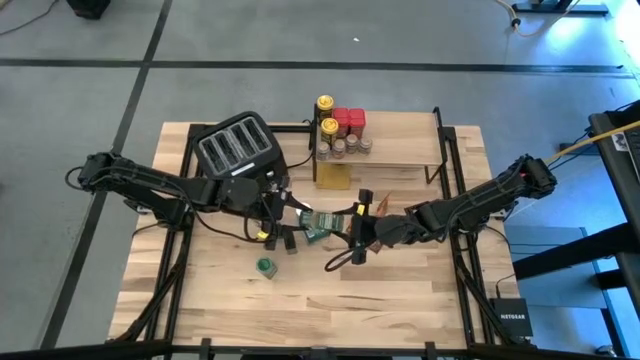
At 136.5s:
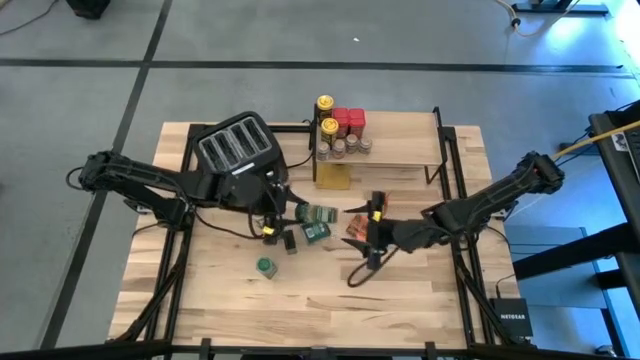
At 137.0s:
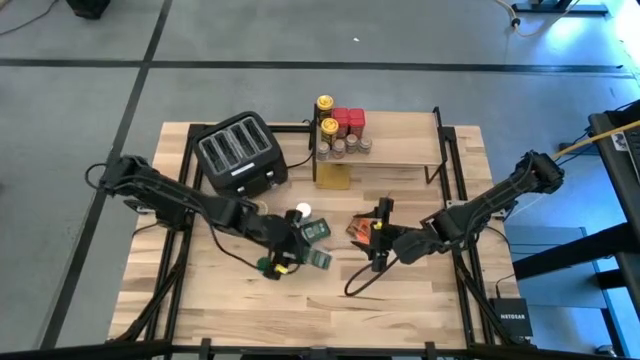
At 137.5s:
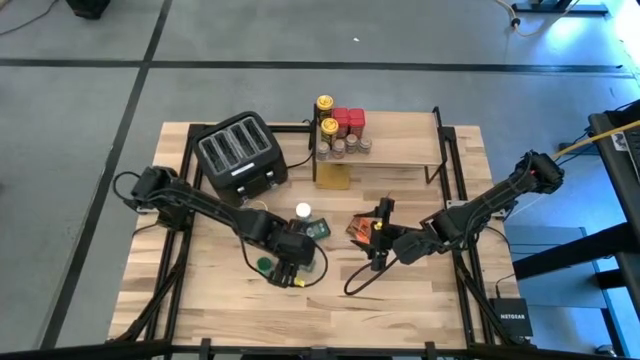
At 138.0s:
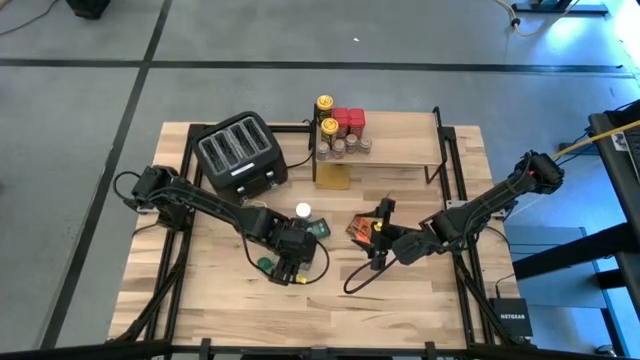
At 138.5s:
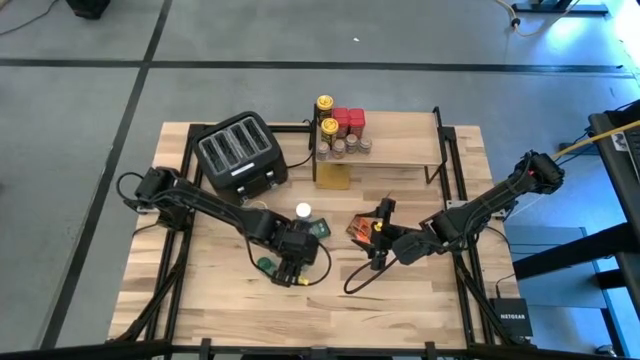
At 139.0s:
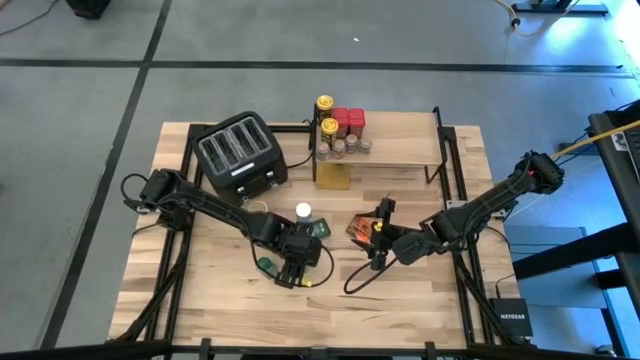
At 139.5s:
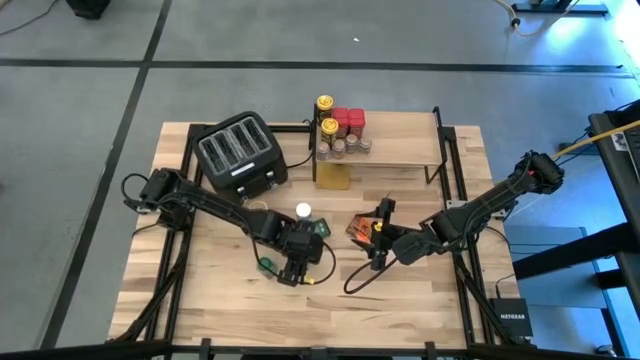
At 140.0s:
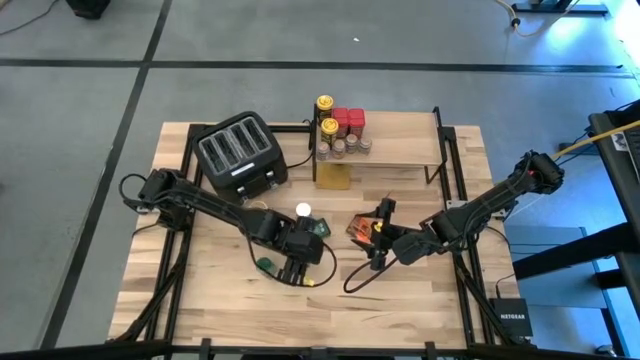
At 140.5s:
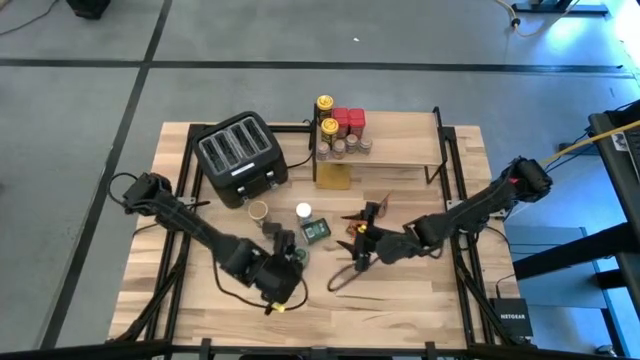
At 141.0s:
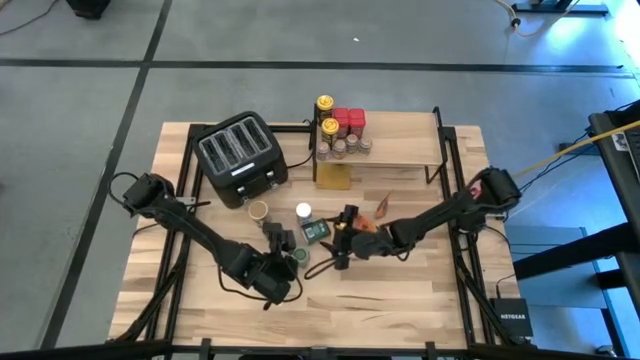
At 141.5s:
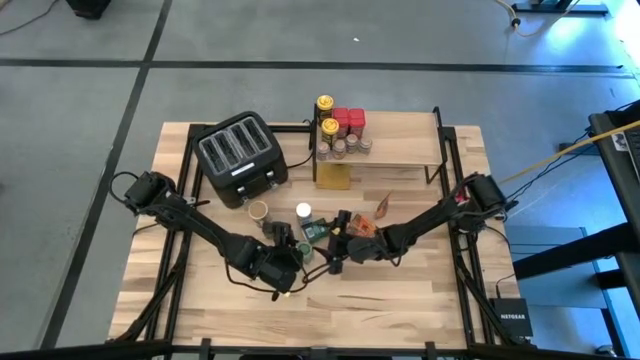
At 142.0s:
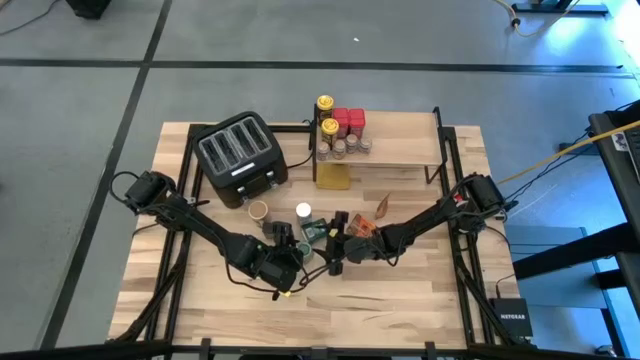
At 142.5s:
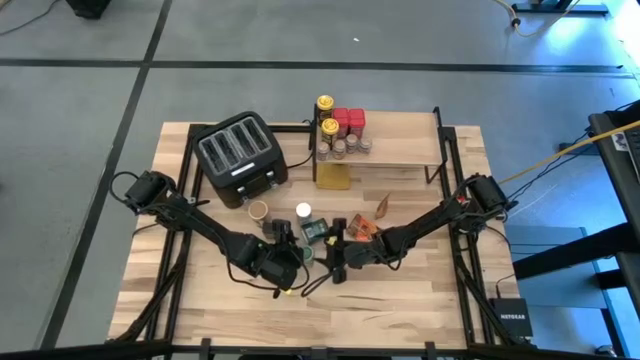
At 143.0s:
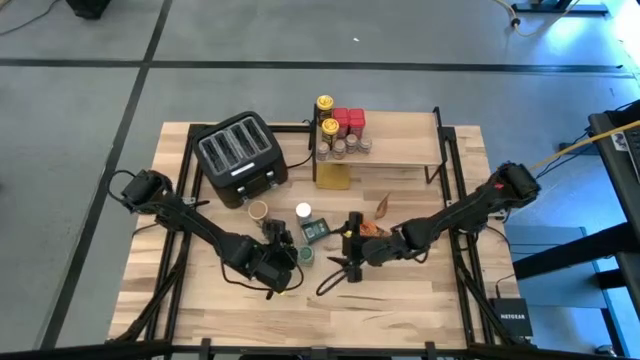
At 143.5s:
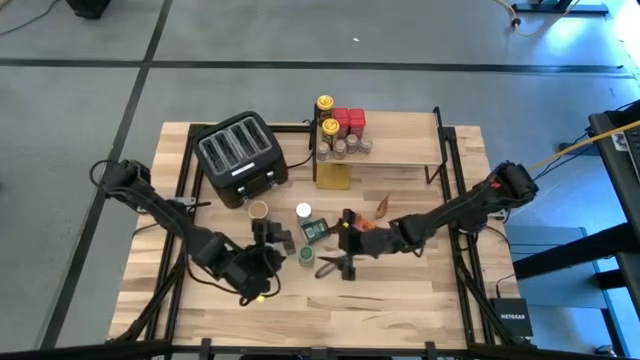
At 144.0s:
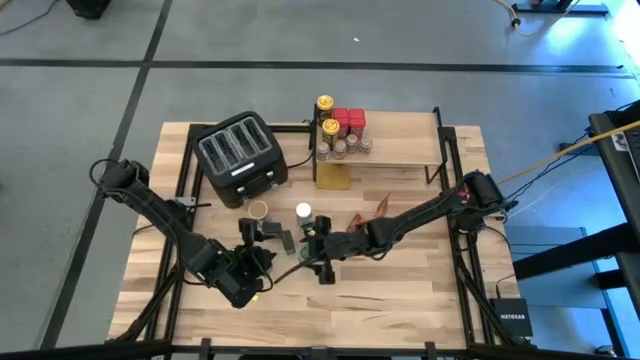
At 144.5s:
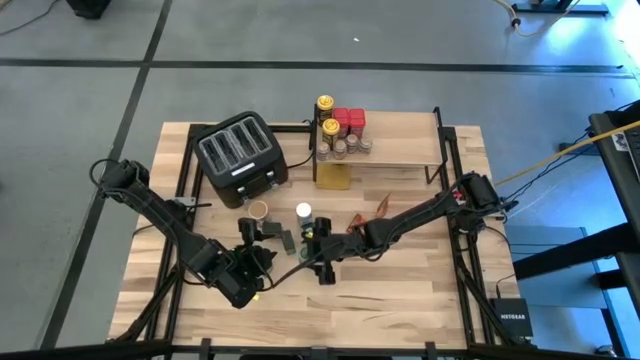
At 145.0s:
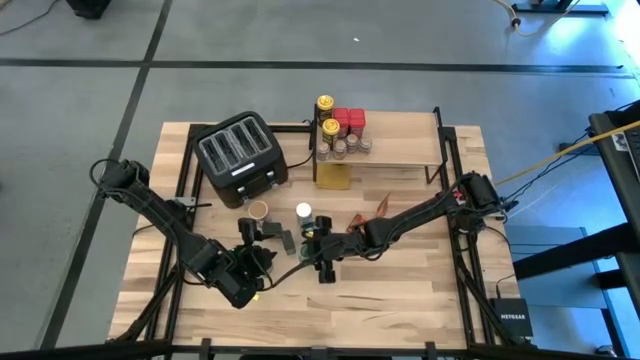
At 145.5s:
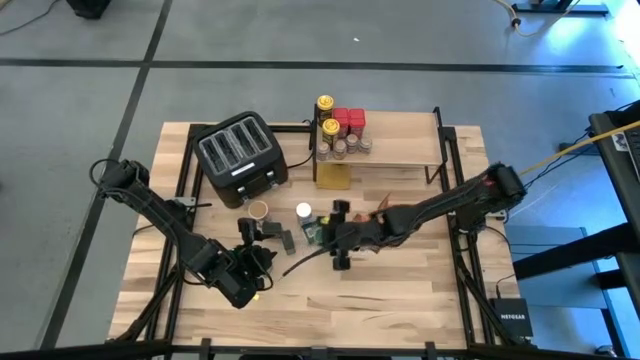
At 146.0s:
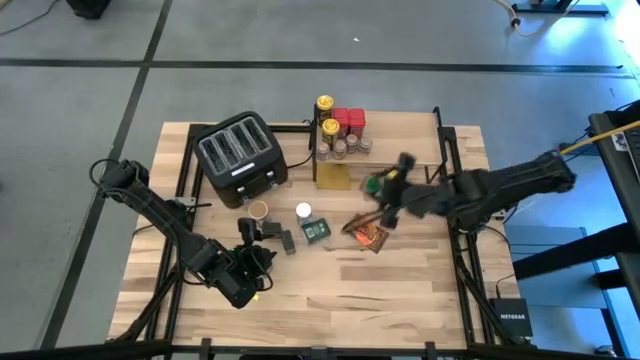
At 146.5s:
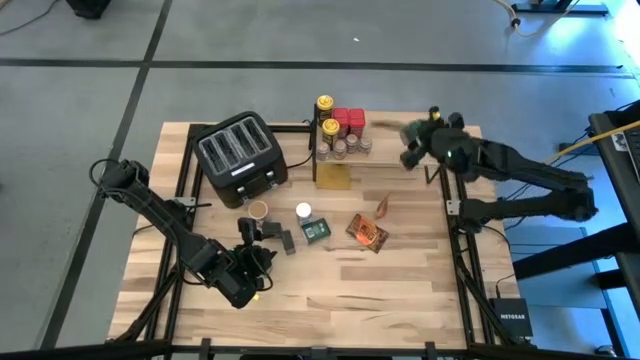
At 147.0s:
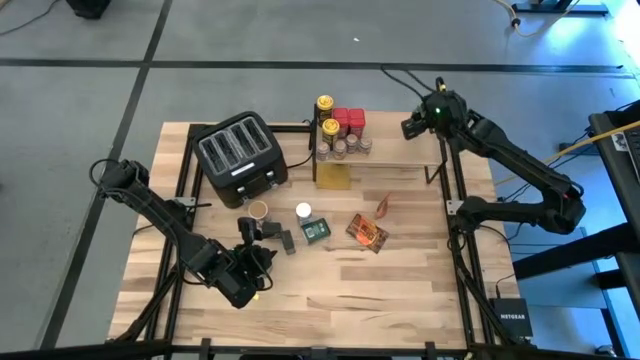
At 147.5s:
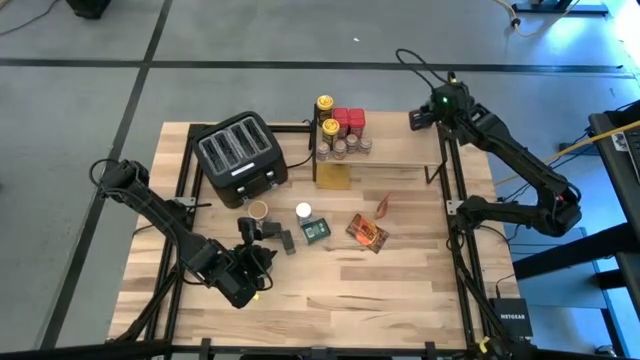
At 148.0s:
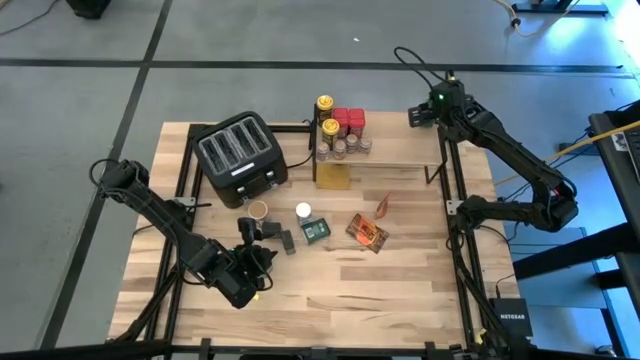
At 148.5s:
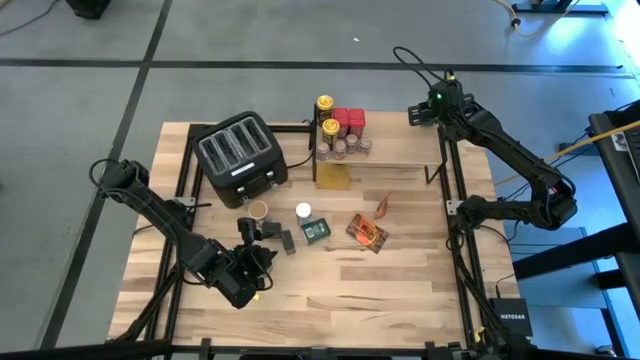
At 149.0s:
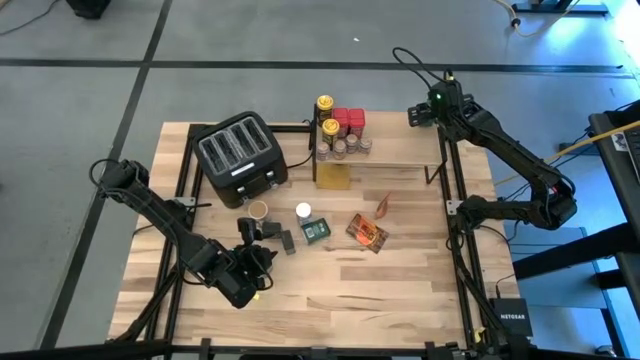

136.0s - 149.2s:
Task: Shelf spices
Put the green seasoning bottle on the shelf

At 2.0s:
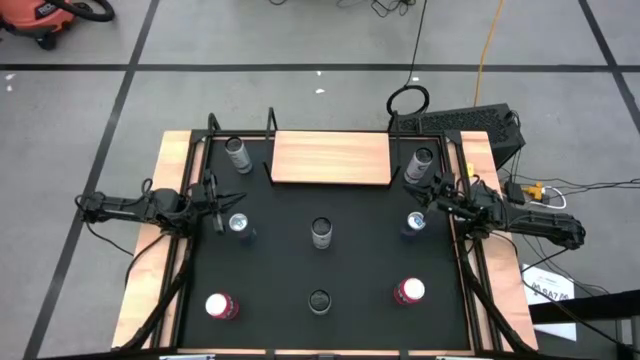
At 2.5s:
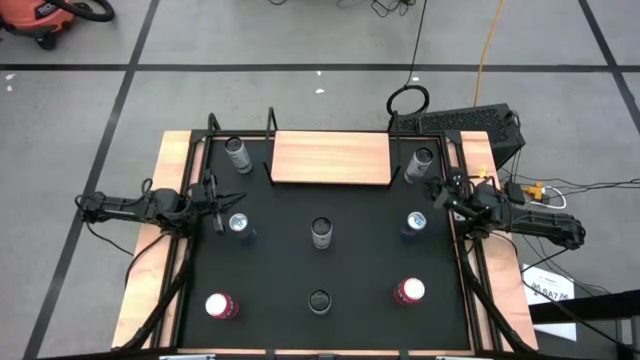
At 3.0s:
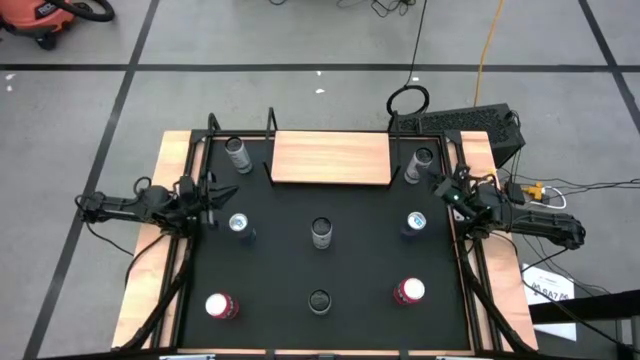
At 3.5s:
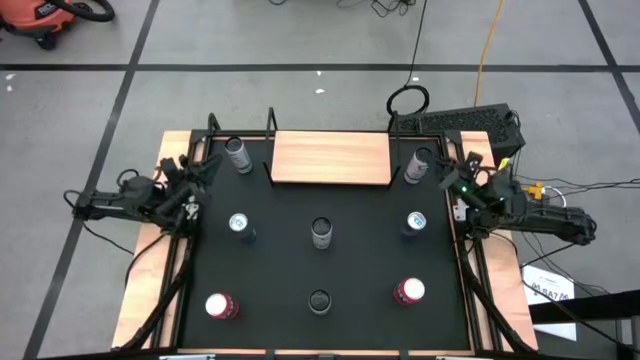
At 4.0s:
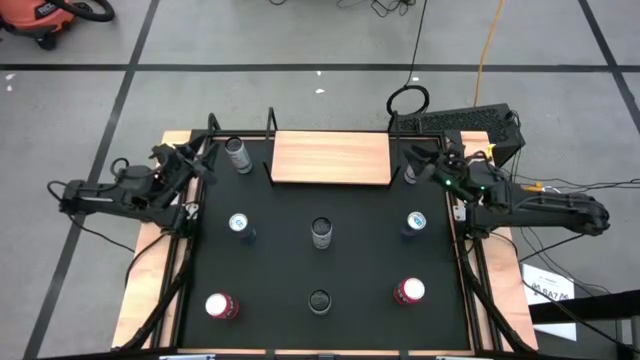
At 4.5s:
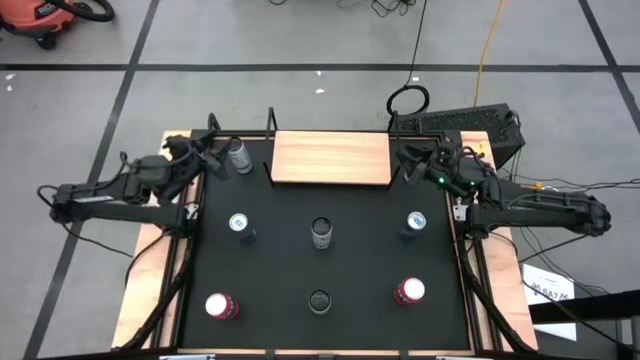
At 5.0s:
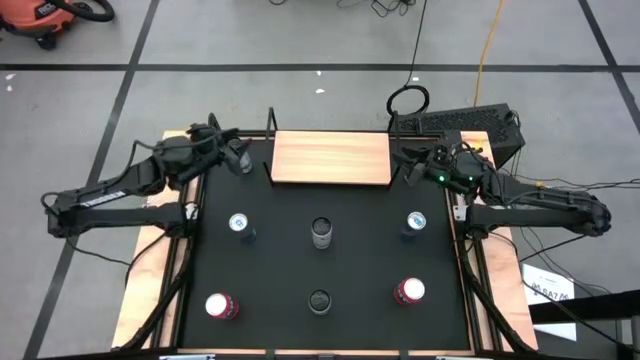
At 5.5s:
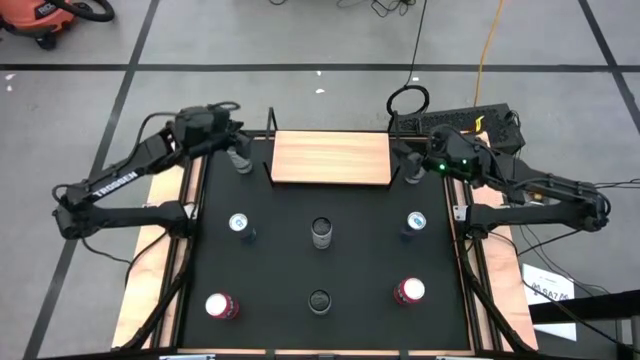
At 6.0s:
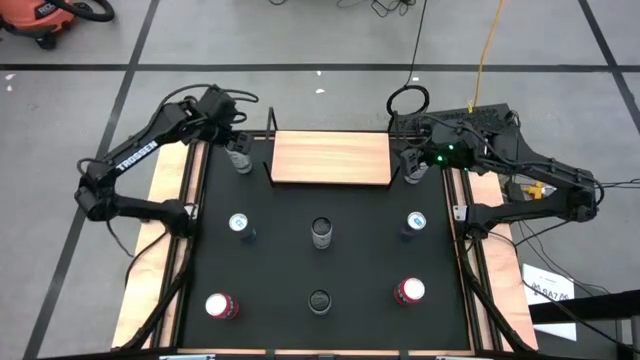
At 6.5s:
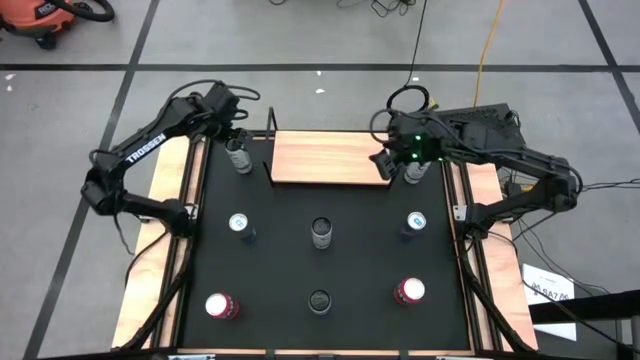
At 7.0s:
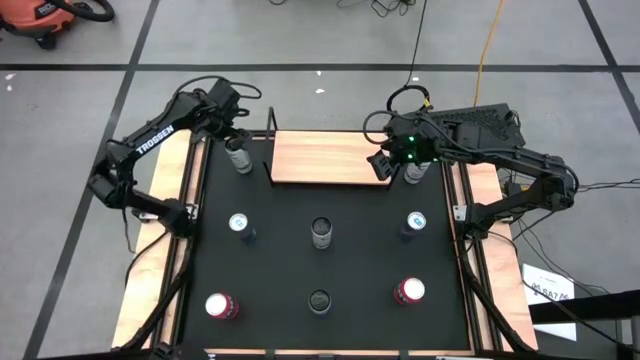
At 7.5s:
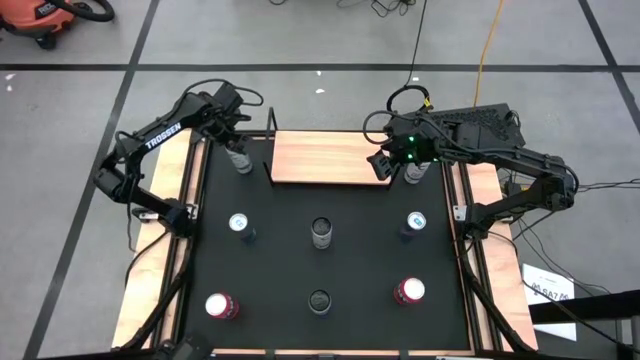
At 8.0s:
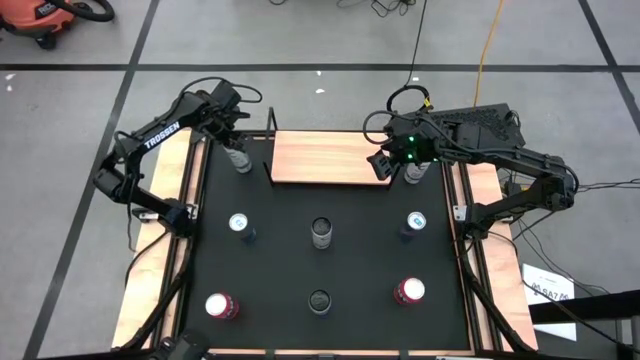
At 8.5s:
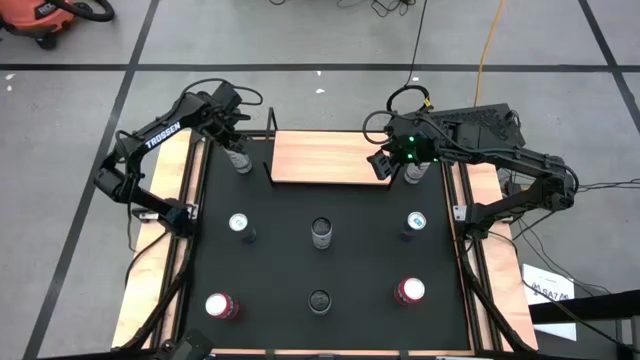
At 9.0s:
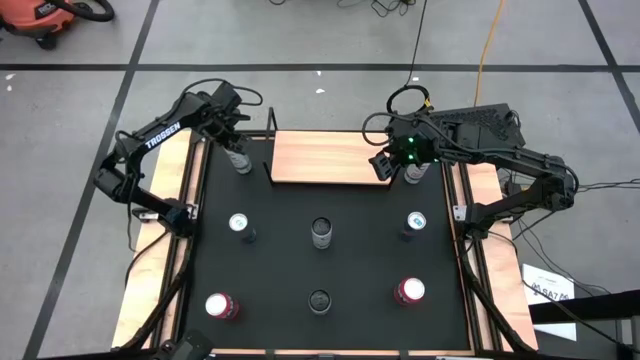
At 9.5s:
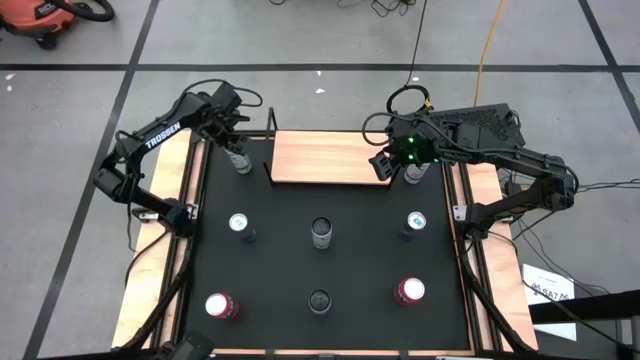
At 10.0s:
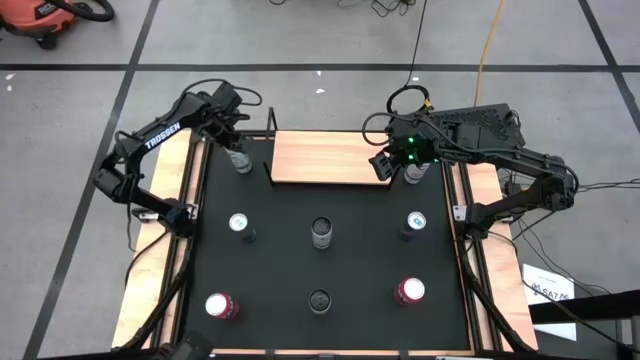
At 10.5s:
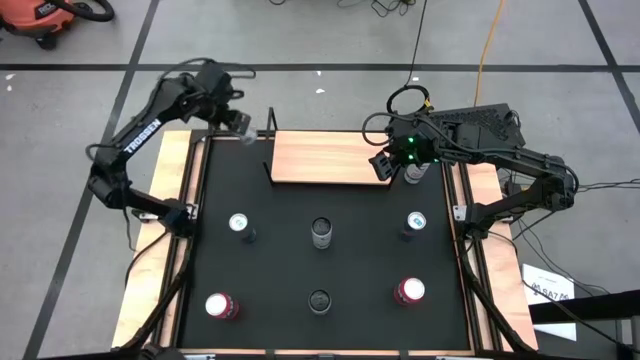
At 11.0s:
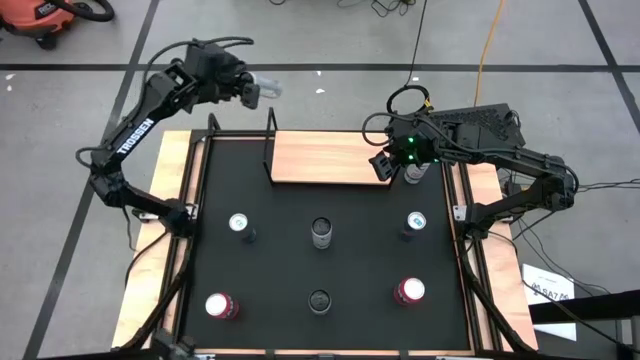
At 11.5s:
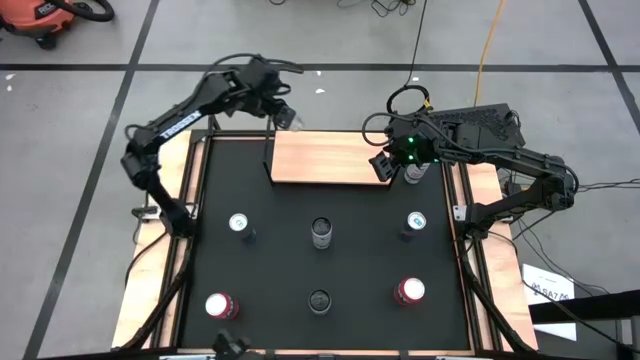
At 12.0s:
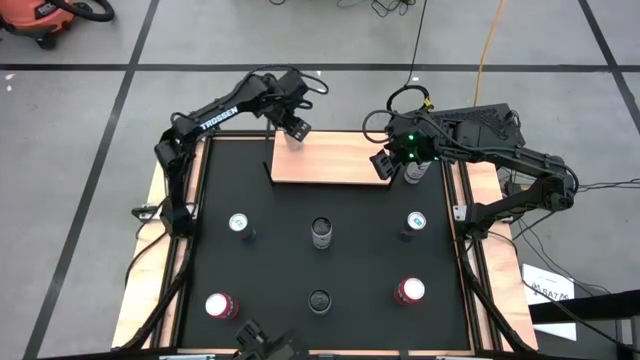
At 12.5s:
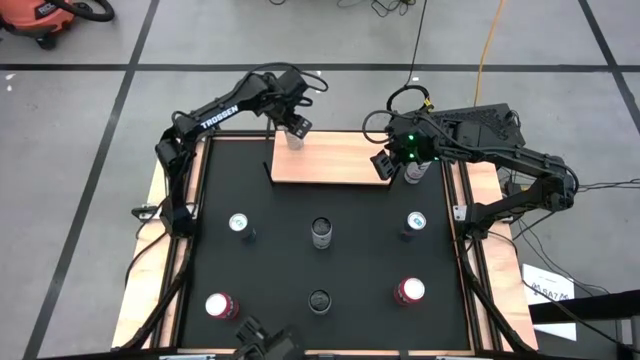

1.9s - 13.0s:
Task: Place canned beverage on shelf
Put the top white-yellow soda can on the shelf
